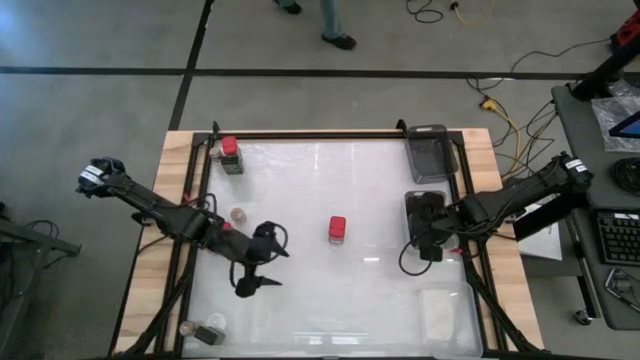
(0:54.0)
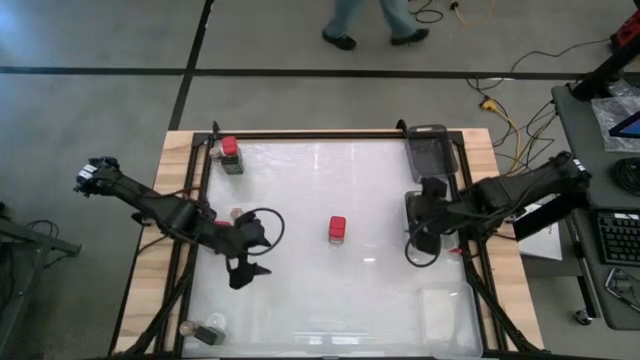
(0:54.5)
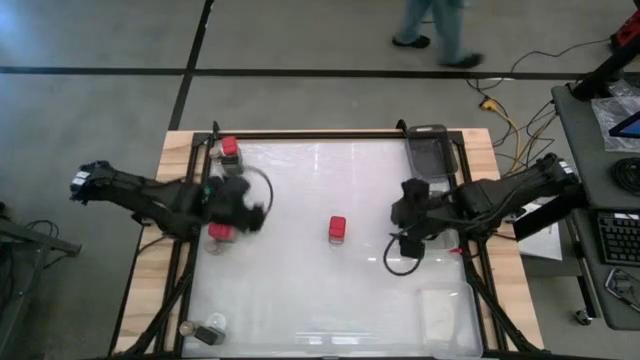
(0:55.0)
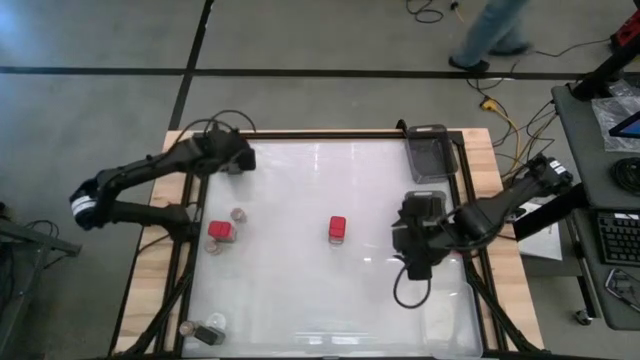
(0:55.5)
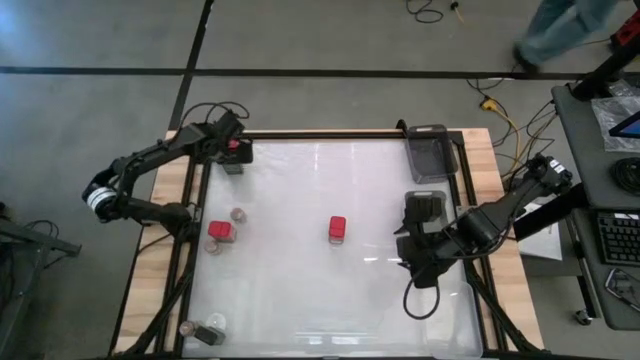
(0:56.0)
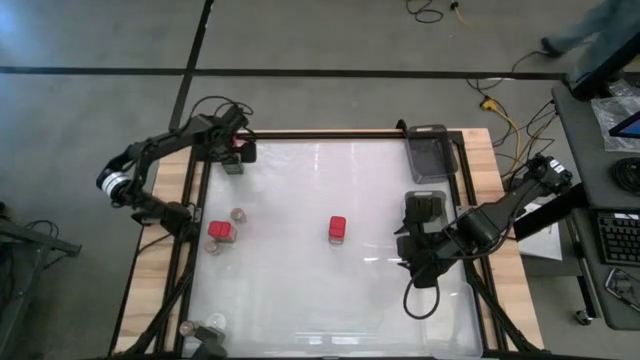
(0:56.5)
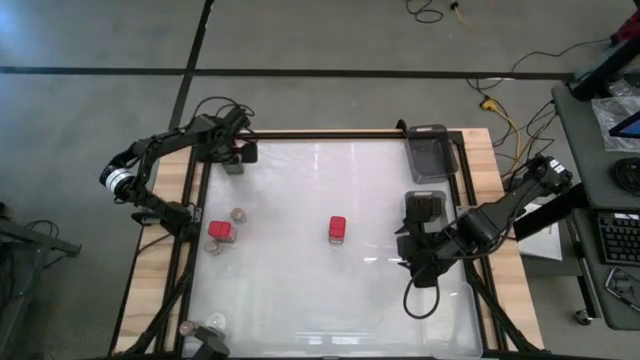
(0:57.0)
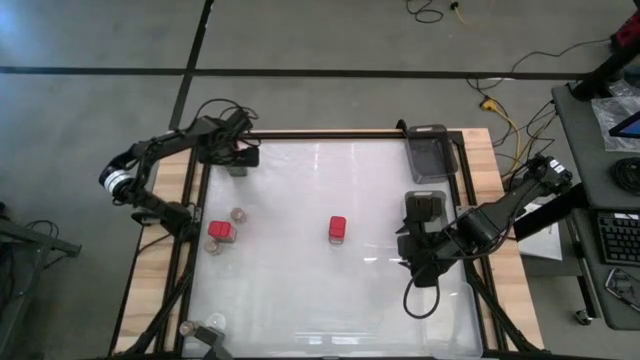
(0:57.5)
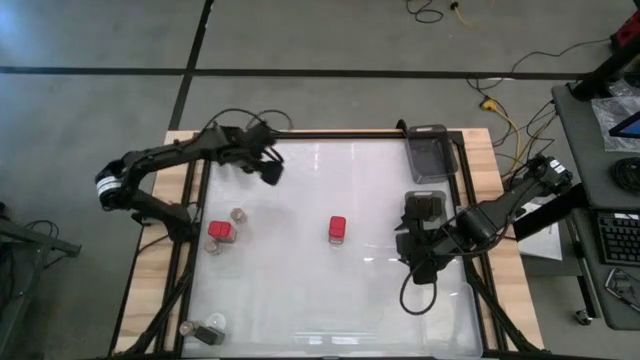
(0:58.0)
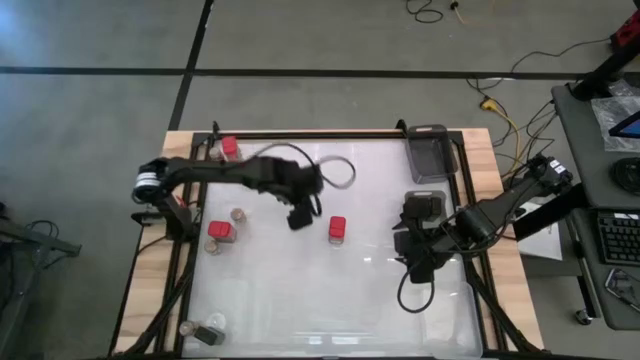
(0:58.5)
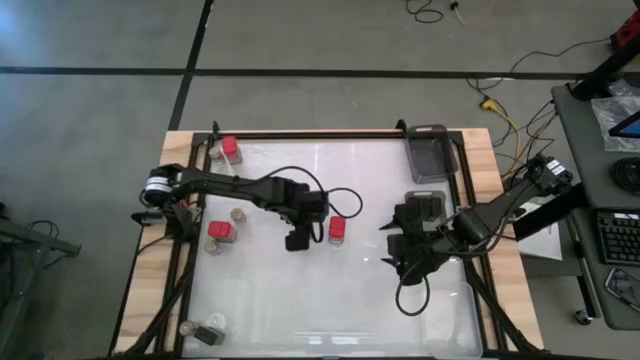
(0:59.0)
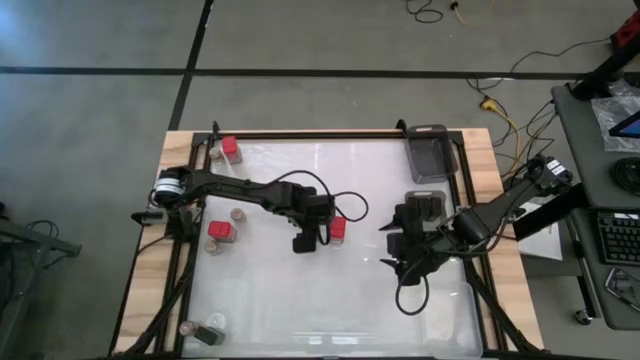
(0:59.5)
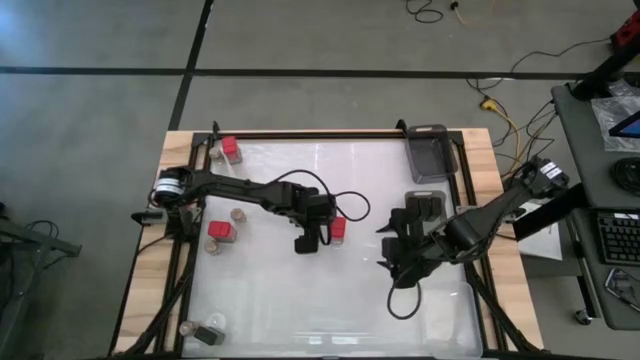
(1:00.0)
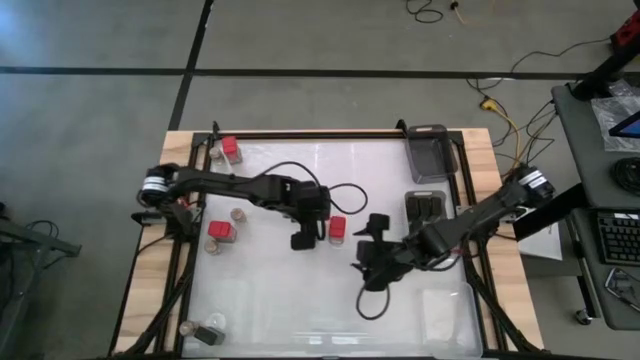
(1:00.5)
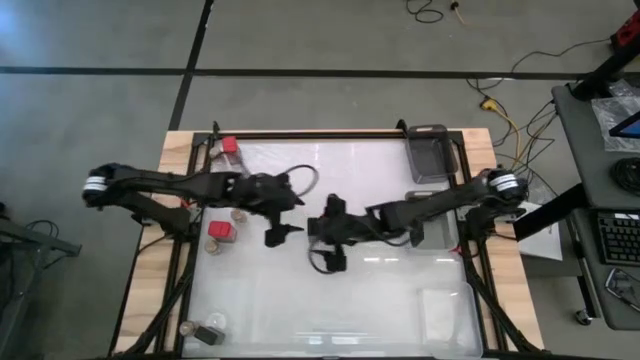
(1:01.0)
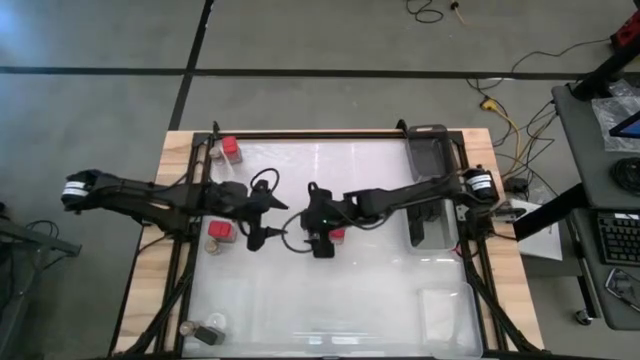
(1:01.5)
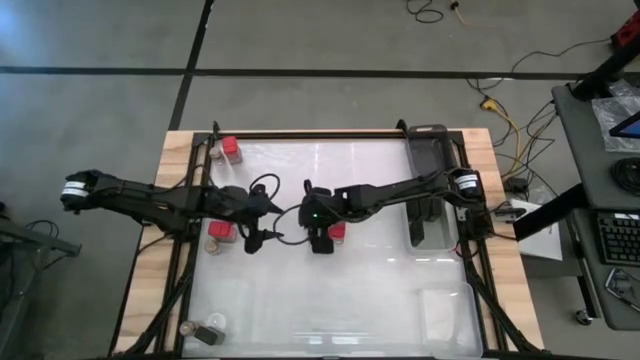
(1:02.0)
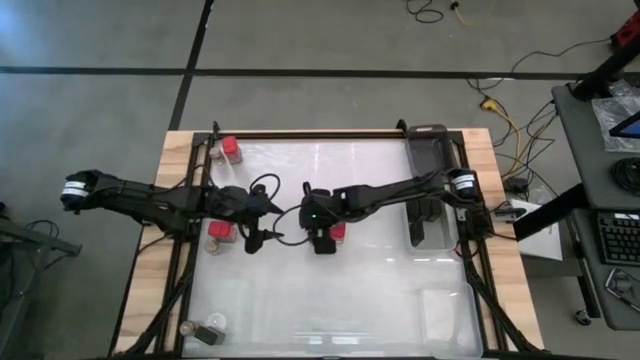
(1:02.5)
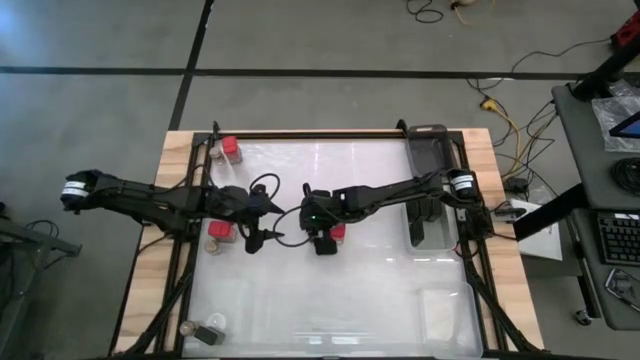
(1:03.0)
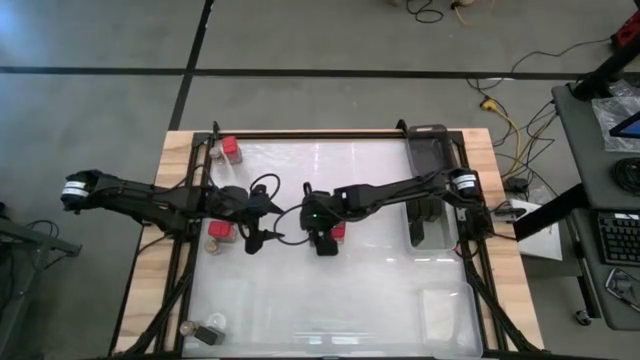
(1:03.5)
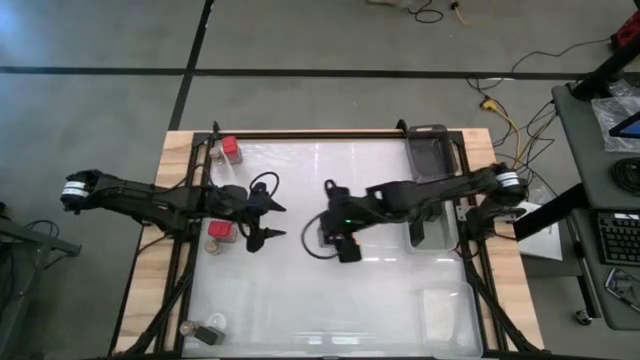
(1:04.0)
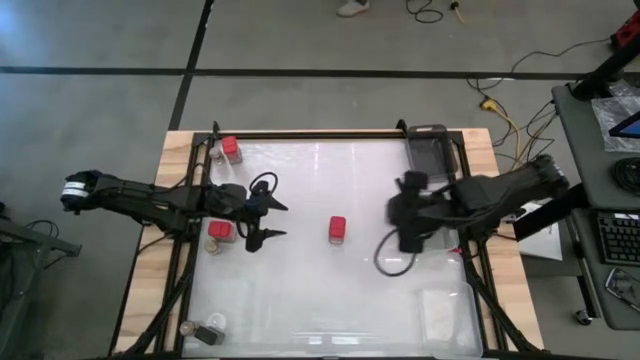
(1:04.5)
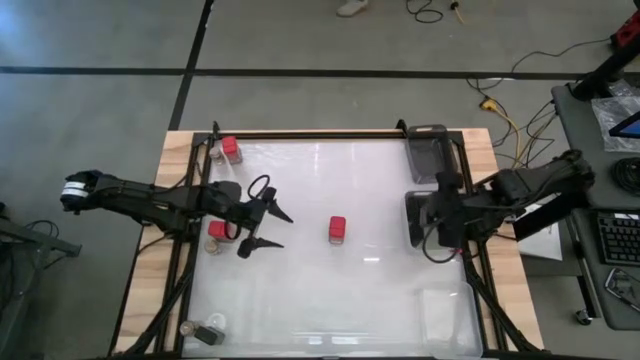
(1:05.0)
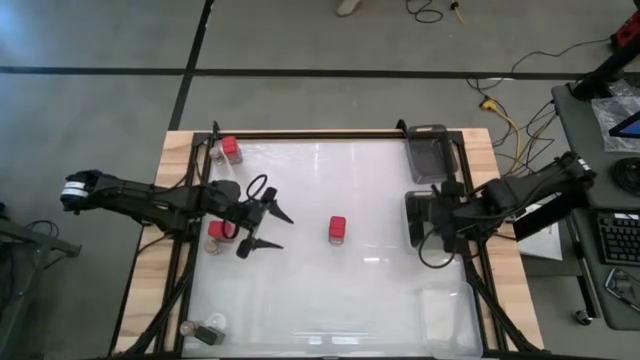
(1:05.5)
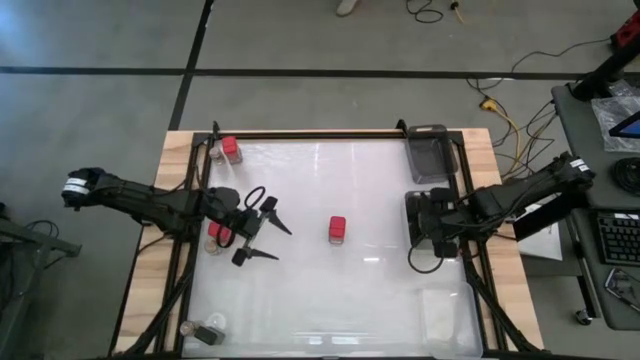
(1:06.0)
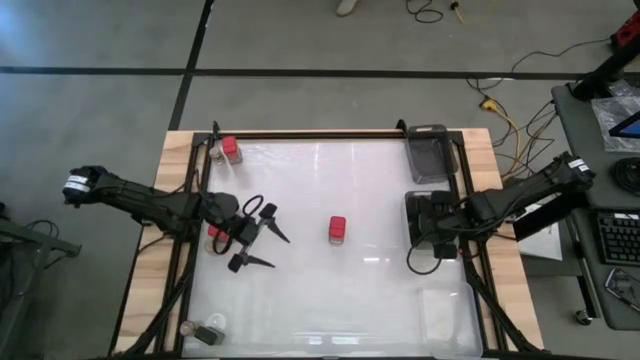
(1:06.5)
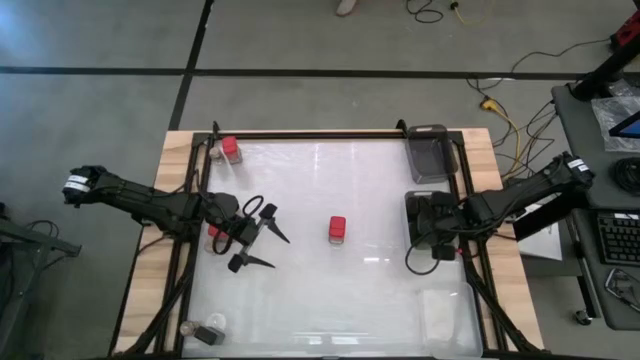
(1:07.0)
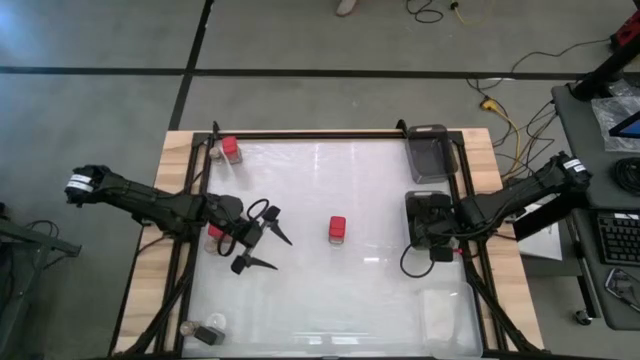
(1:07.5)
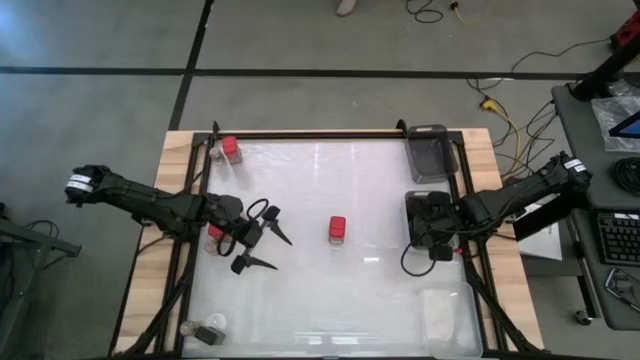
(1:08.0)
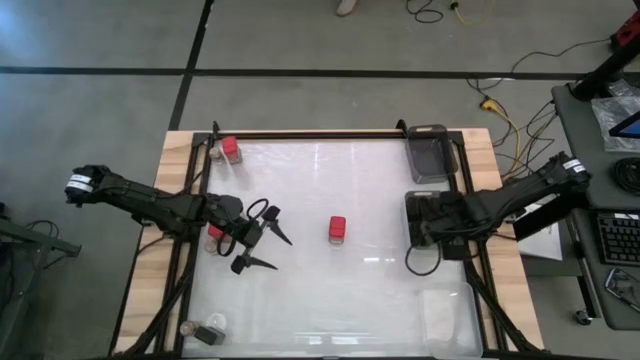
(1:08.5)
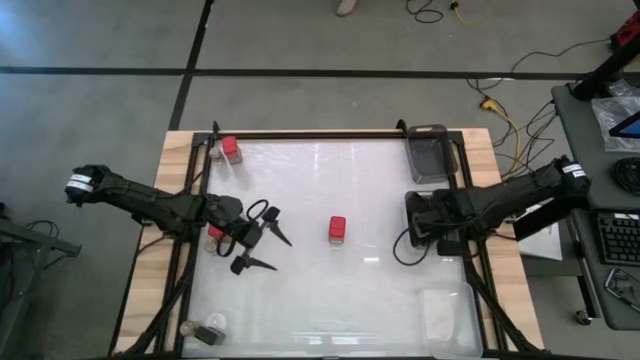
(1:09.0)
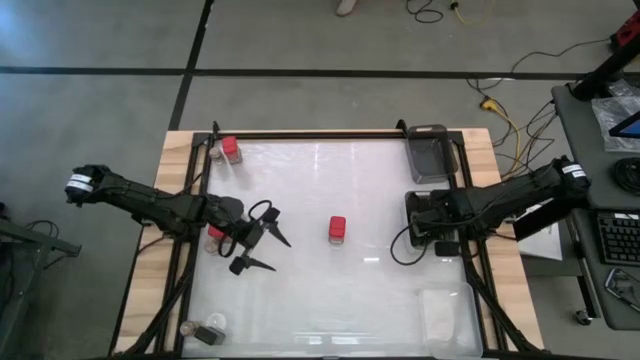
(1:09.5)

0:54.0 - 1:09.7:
Task: Sort spices by type
Put the green seasoning can into the gray bin

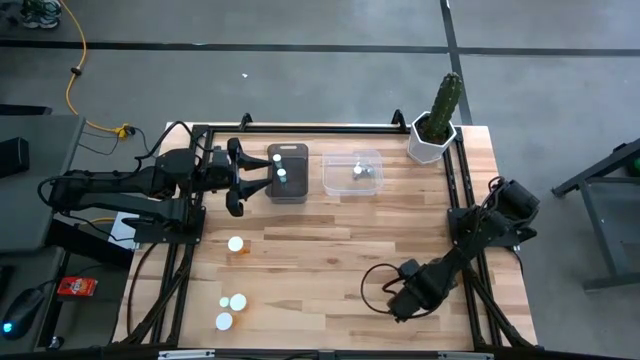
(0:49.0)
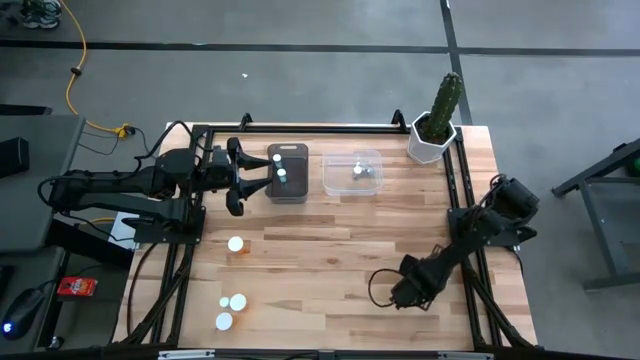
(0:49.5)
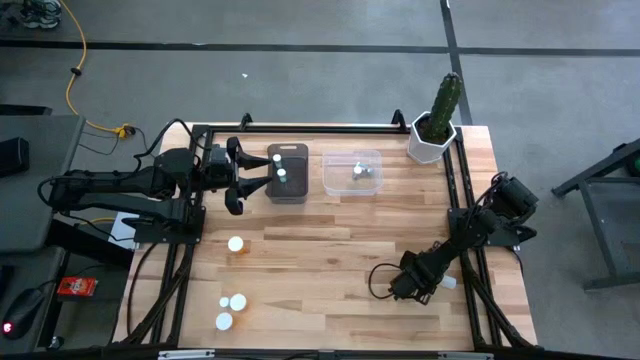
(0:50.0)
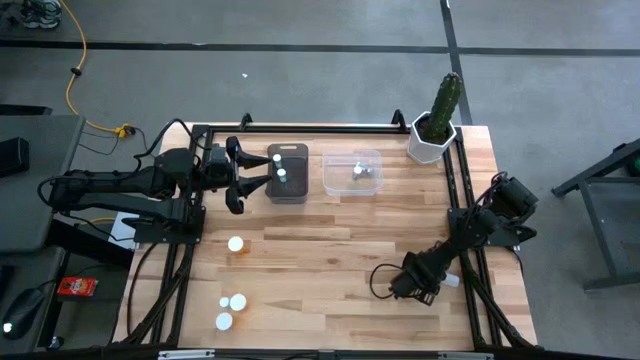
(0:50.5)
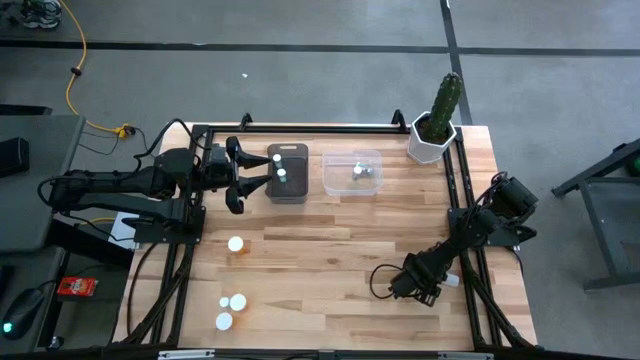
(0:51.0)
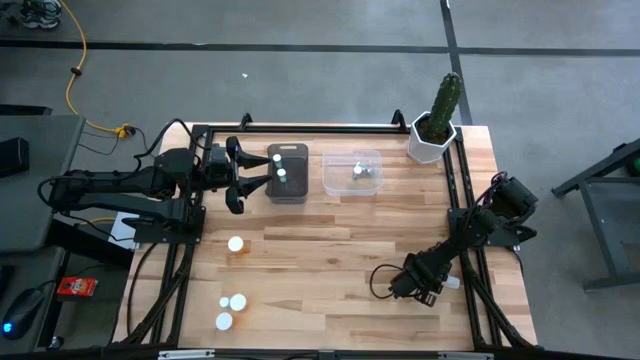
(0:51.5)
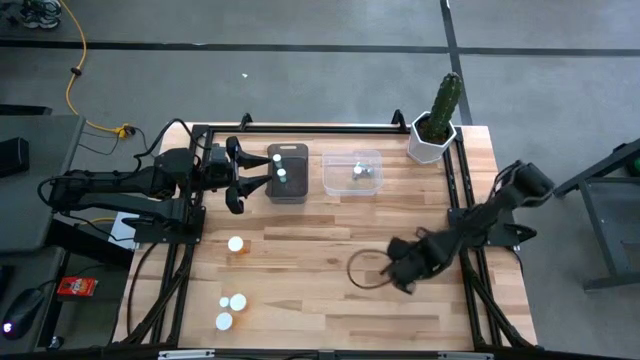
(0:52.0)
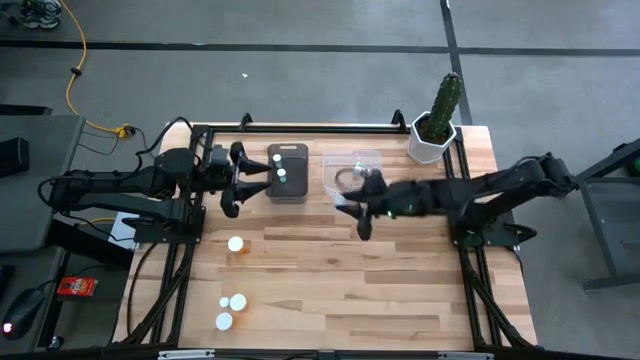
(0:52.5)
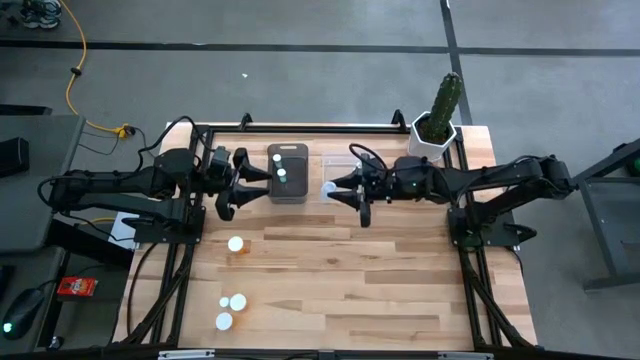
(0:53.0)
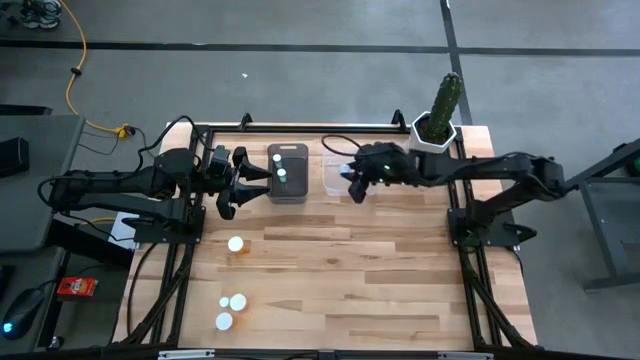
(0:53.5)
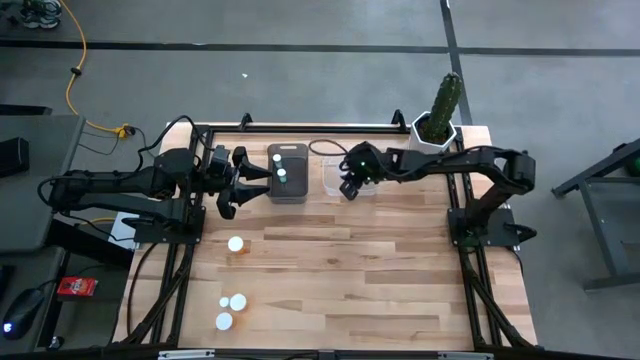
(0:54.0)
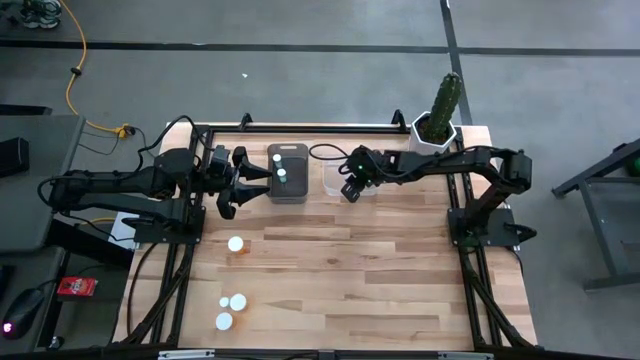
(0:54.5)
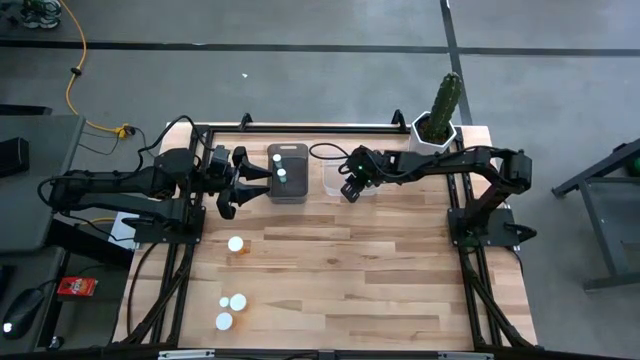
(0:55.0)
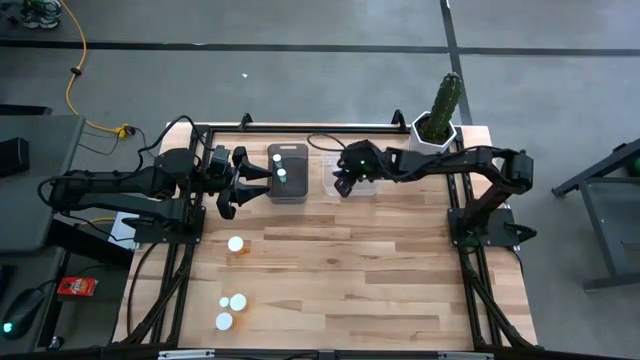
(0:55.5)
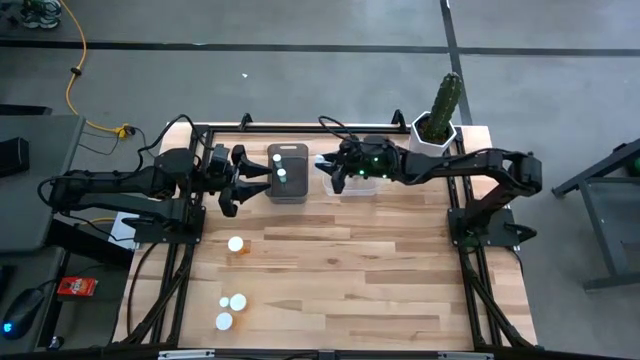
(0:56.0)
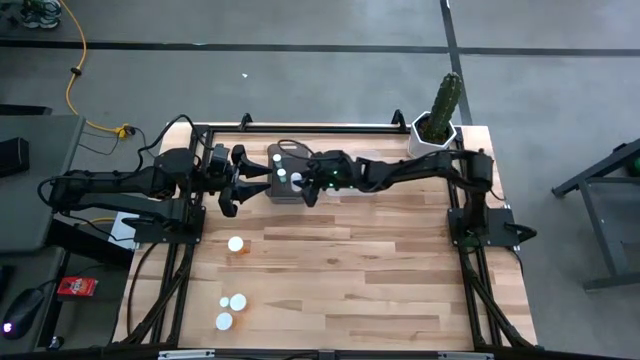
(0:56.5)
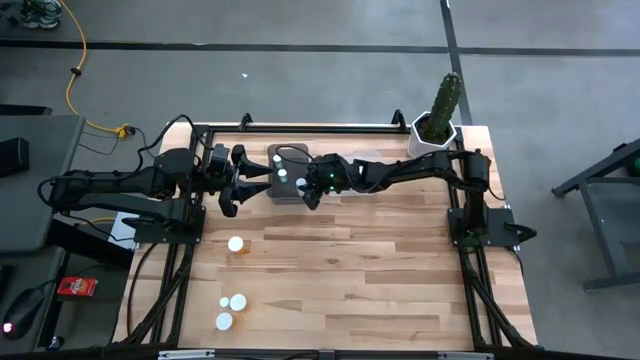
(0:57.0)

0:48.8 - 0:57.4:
Task: Pick and place medicine bottles into bin by pill shape (circle, oval)
Put the white tablet bottle into the black bin
